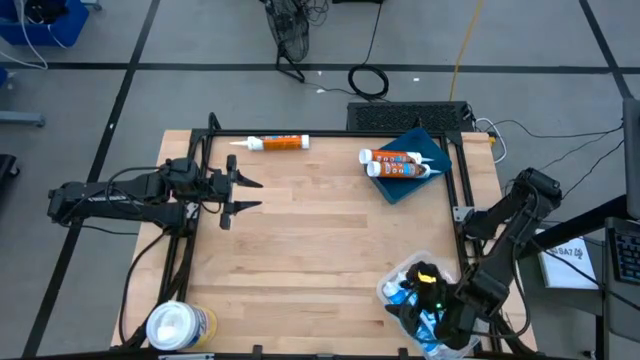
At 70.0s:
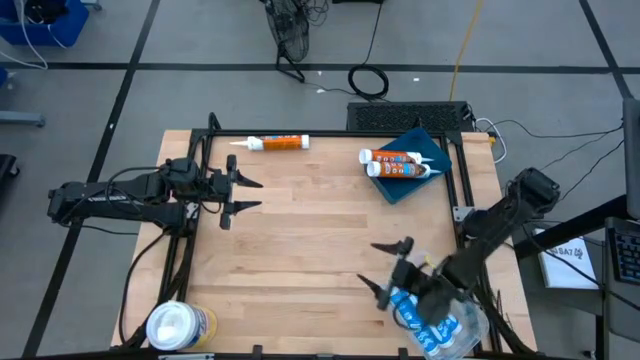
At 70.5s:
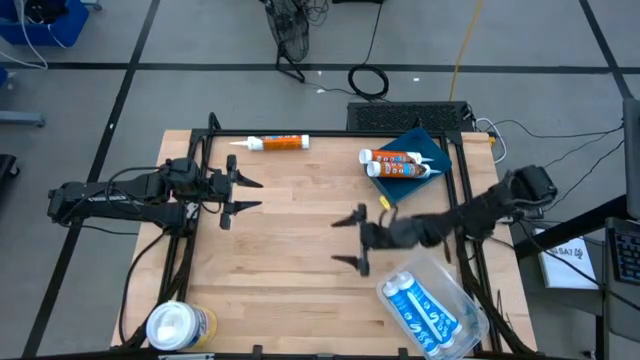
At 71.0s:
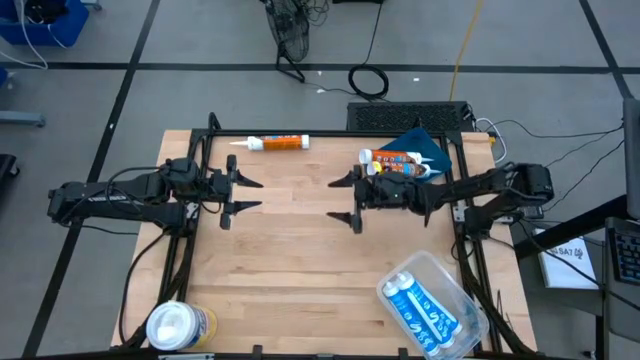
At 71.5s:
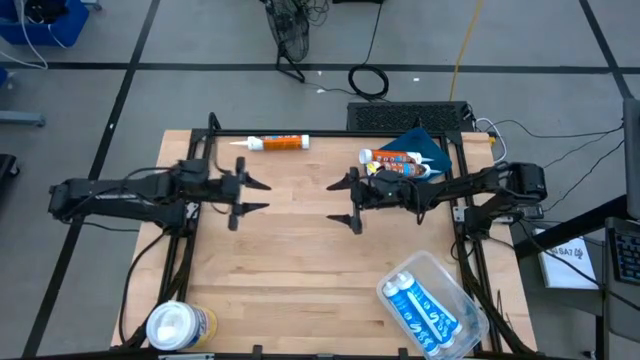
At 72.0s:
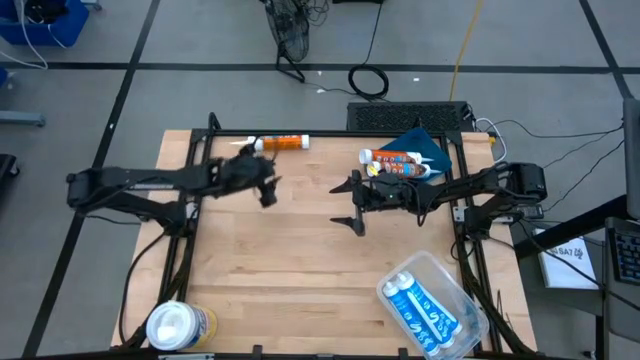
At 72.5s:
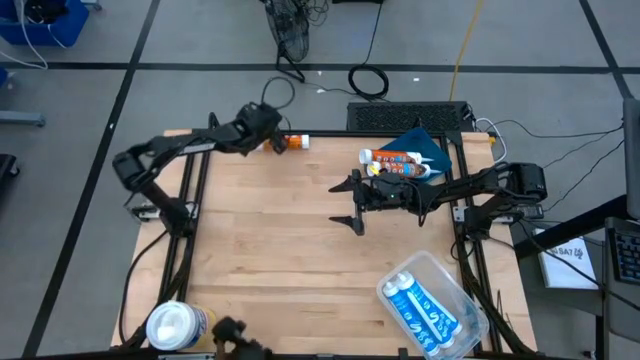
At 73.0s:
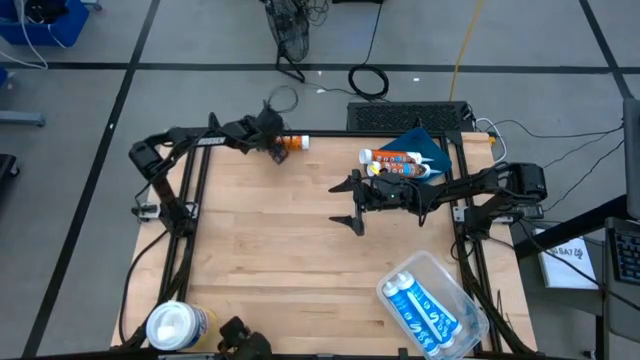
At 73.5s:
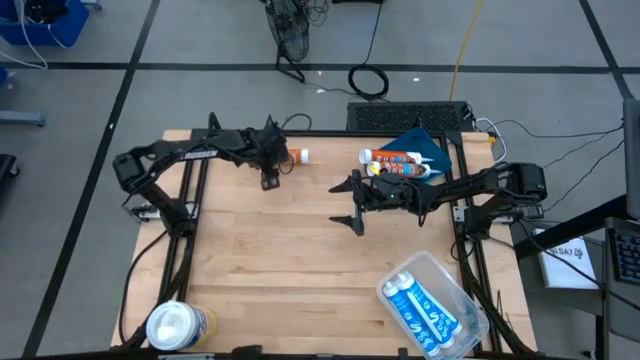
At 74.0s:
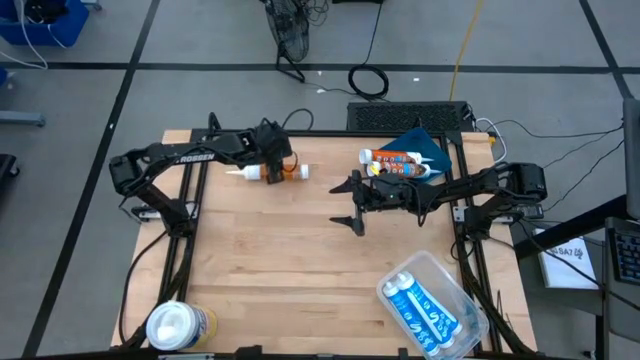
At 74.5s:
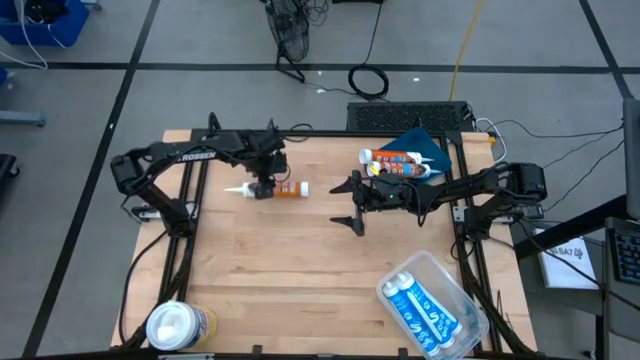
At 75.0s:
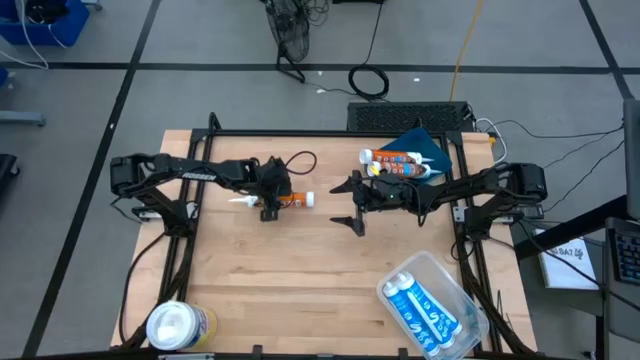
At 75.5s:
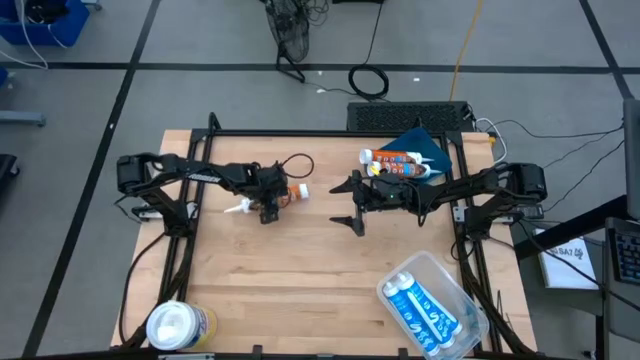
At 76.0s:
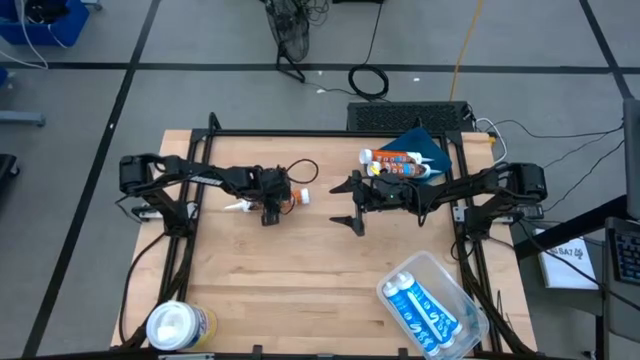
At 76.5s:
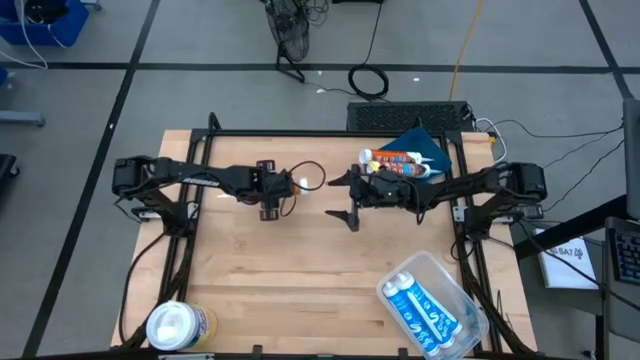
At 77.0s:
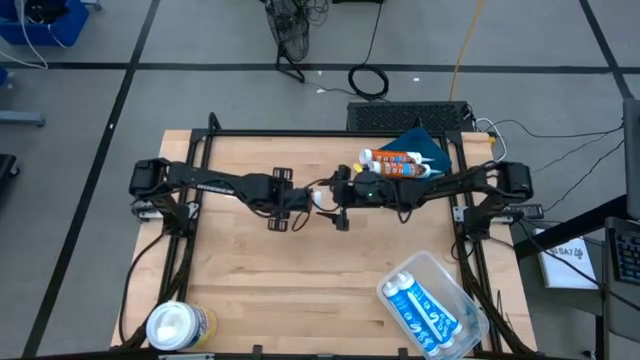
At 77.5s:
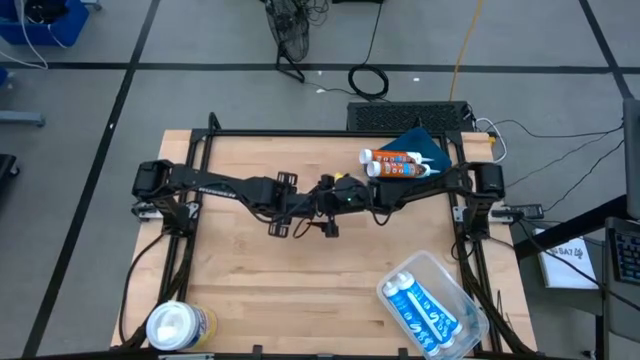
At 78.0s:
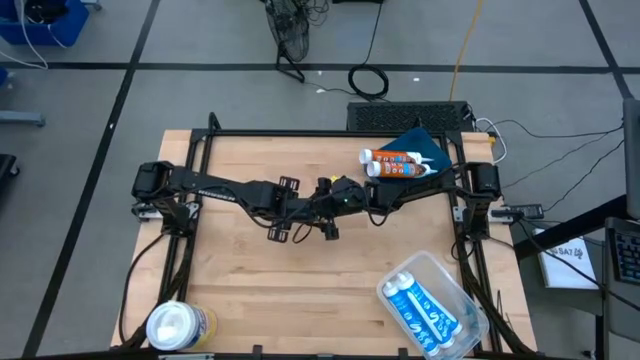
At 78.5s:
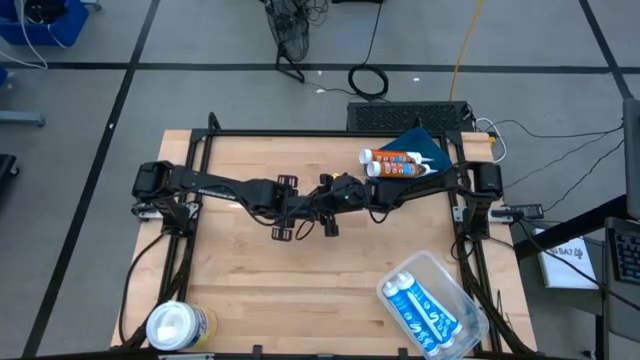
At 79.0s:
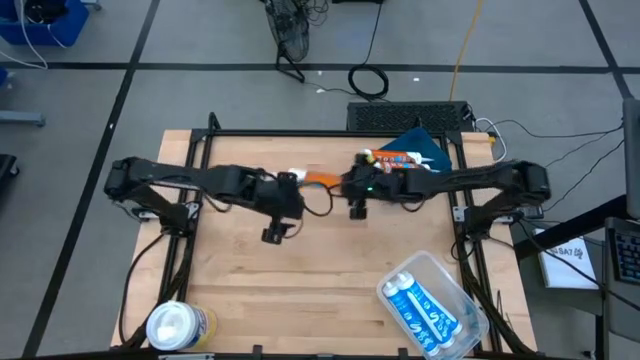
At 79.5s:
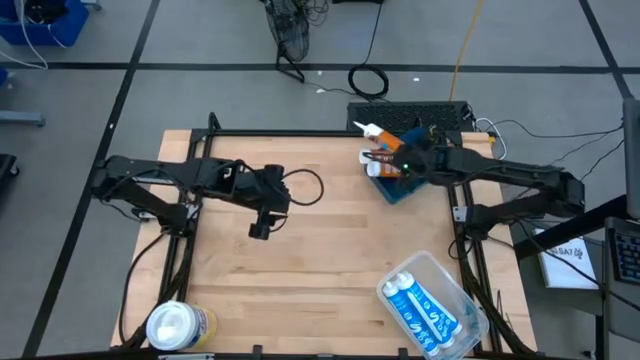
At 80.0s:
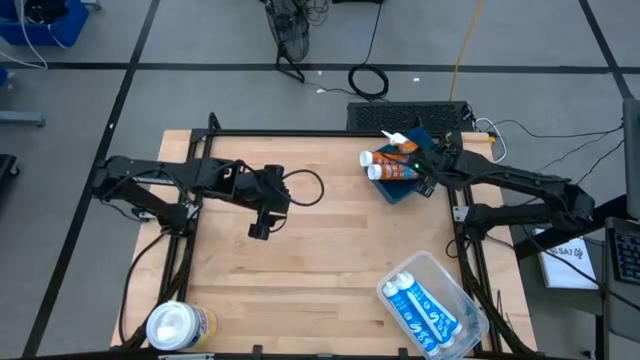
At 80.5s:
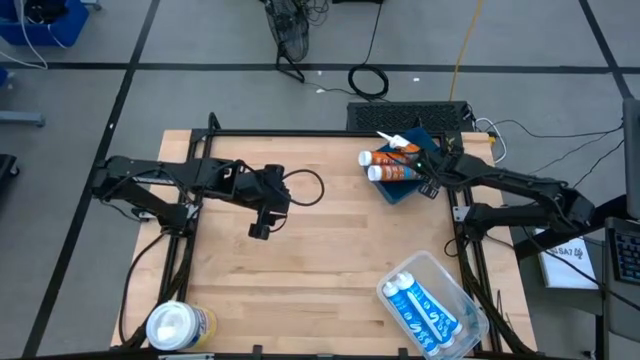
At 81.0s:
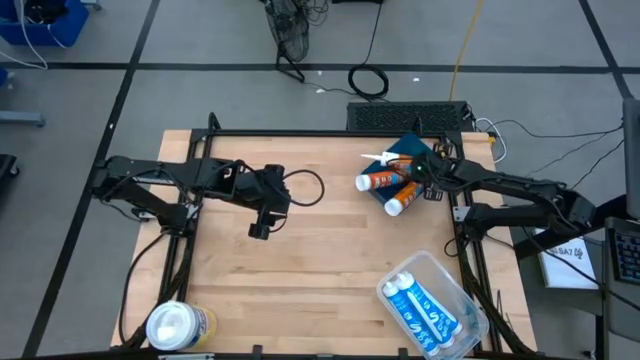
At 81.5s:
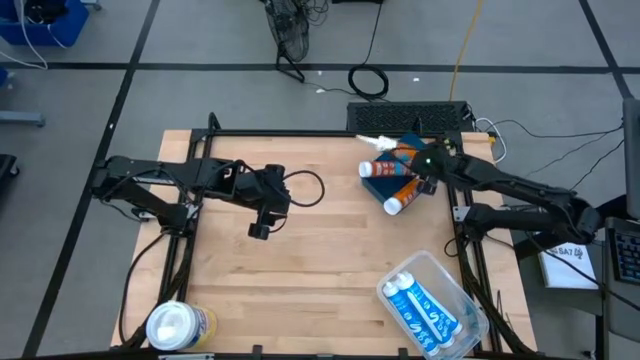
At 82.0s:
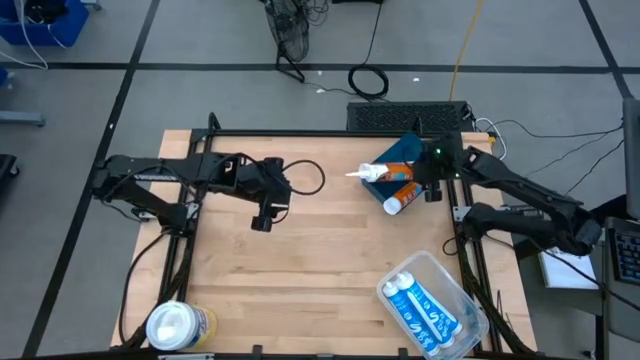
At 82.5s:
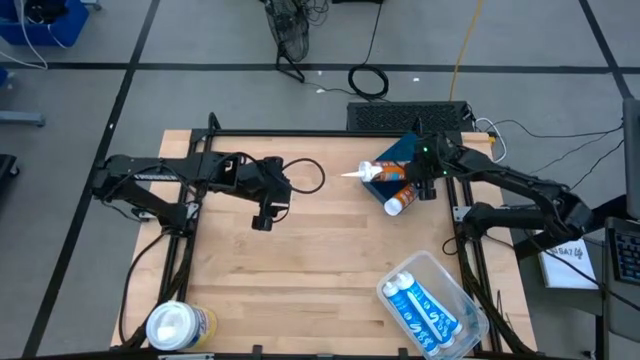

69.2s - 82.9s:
Task: Pick & place silicon tubes, Sealant and Lysol wipes
Put the orange sealant into the blue bin

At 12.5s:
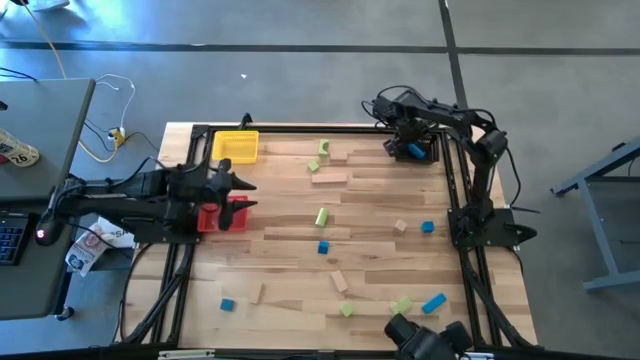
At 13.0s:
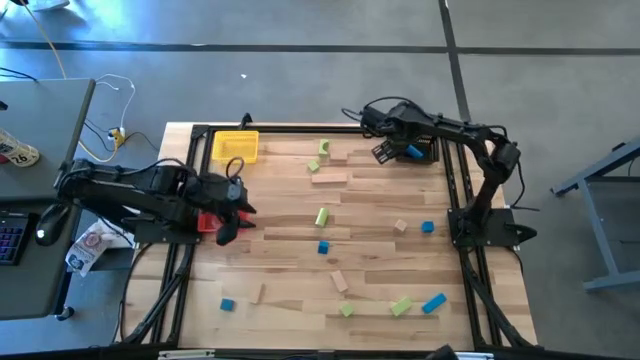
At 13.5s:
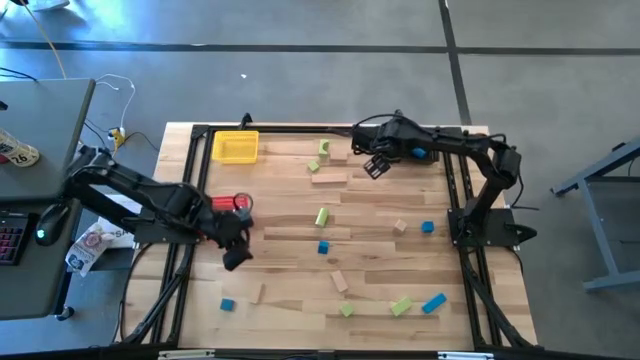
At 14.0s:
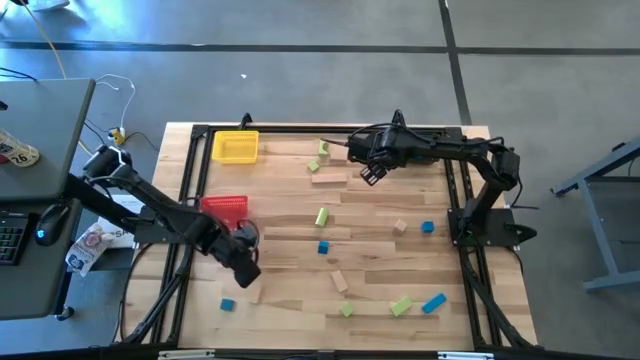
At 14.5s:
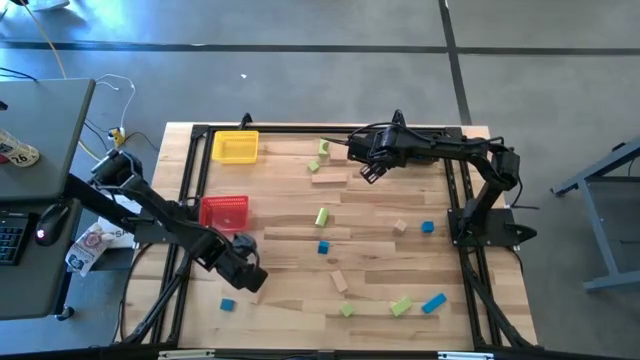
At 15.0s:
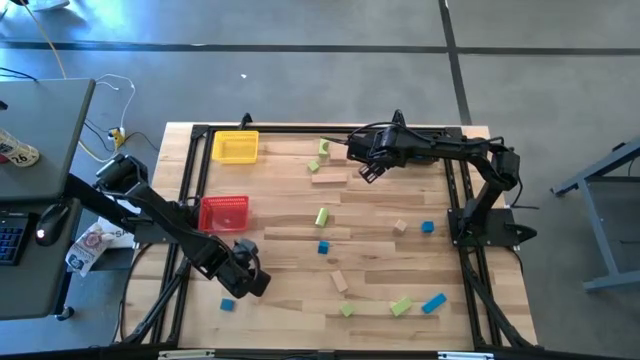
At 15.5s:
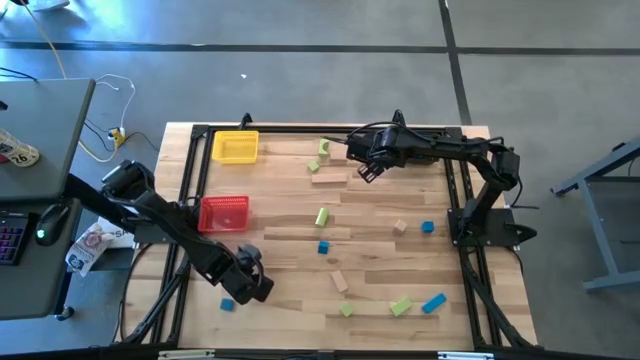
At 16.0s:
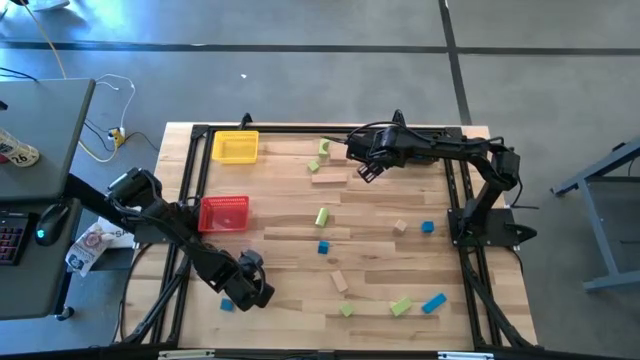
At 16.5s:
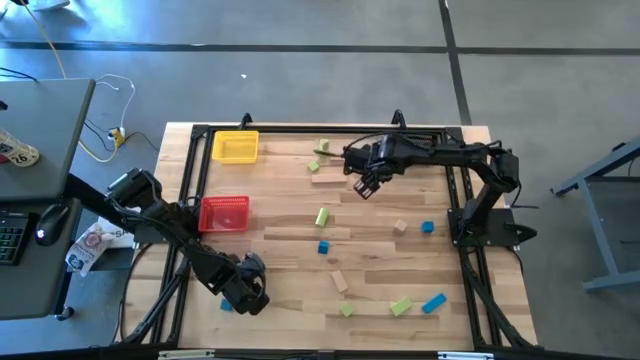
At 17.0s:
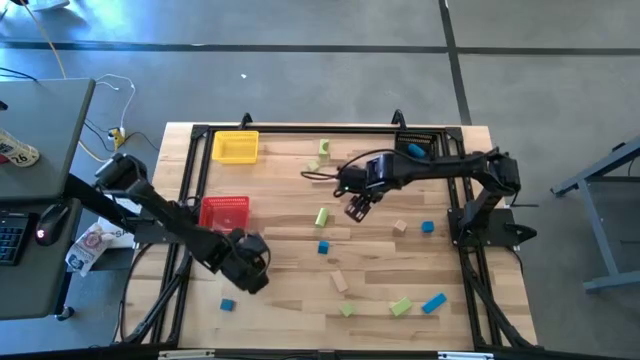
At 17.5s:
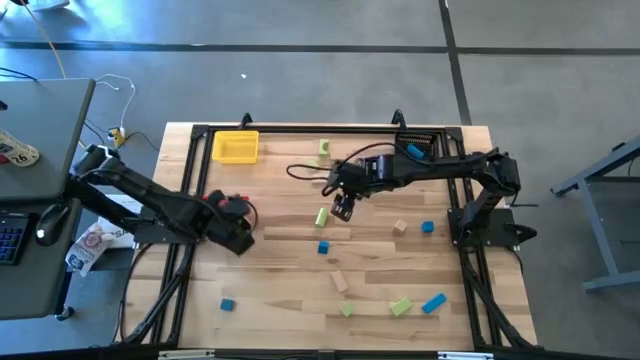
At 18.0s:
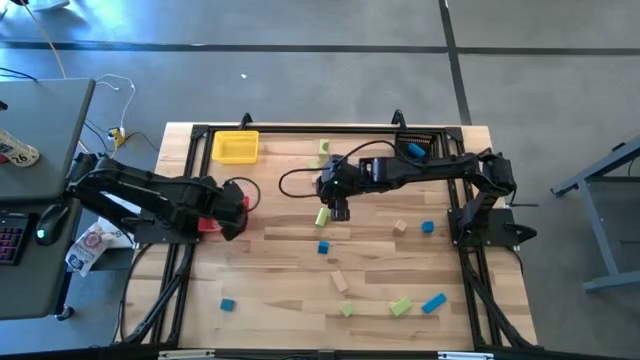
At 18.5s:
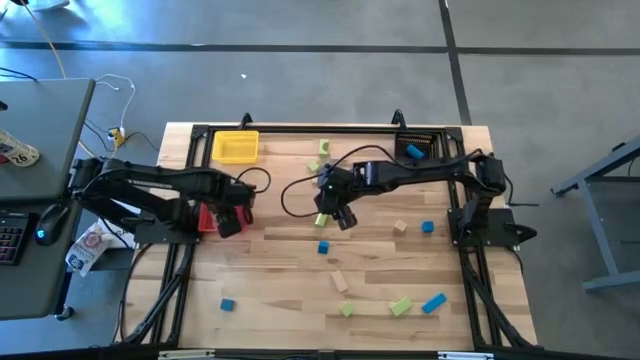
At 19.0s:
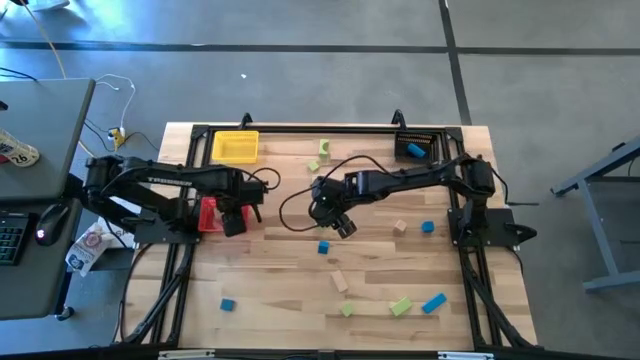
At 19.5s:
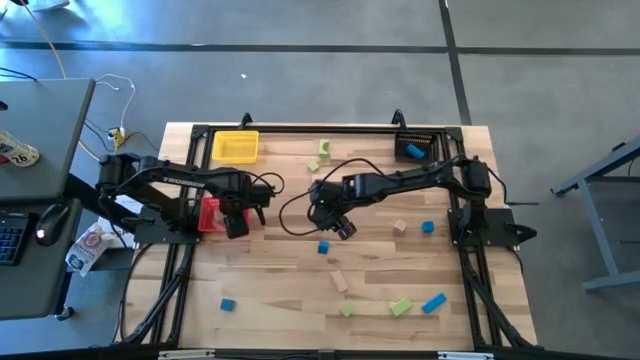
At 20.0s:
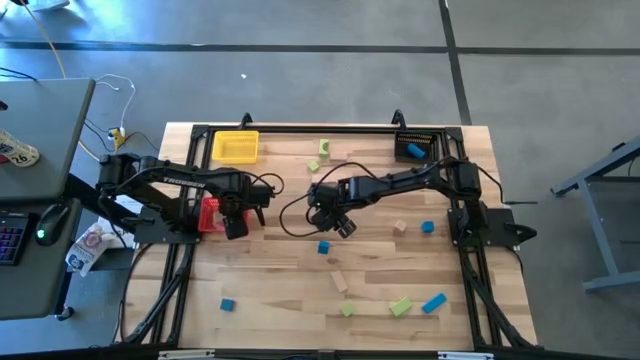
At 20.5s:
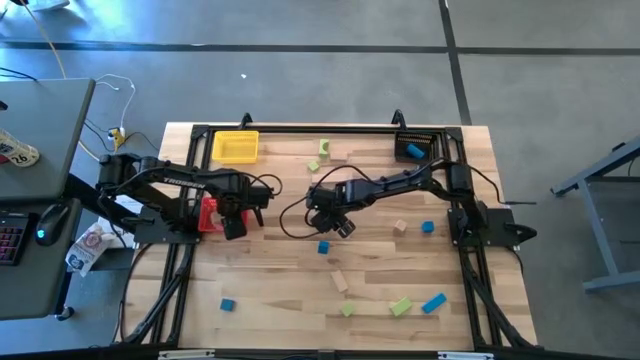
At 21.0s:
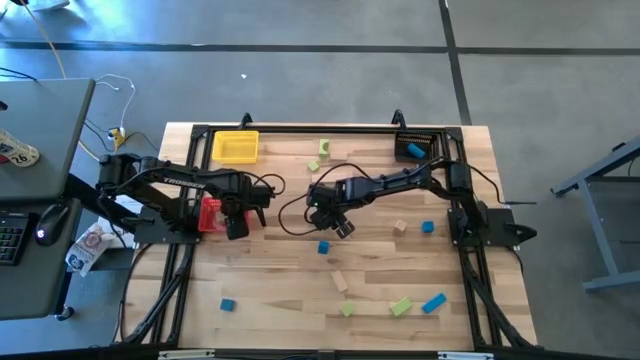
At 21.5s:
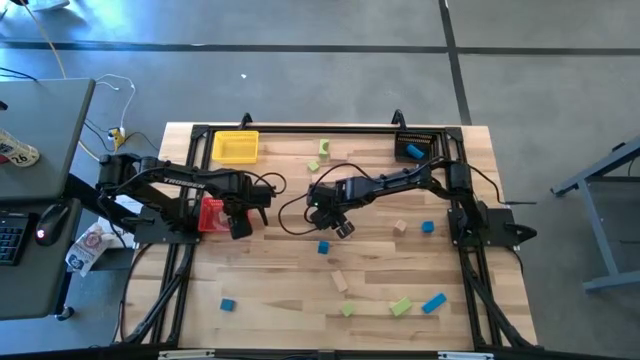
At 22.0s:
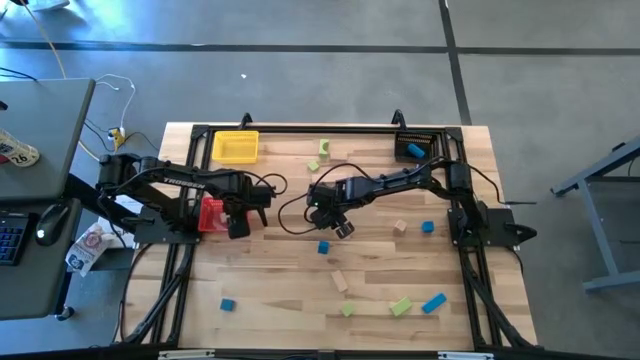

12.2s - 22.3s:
Task: Sort & place blocks by color
Put the brown block into the red bin
